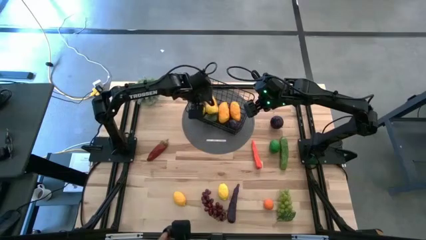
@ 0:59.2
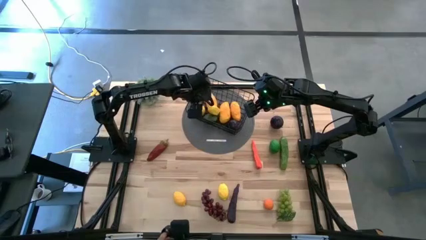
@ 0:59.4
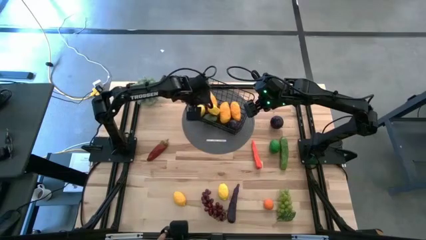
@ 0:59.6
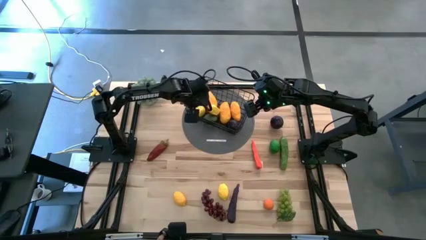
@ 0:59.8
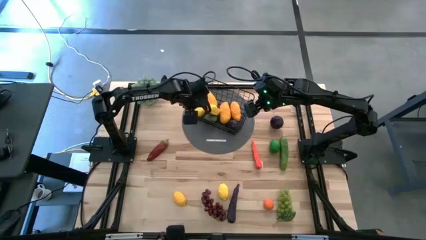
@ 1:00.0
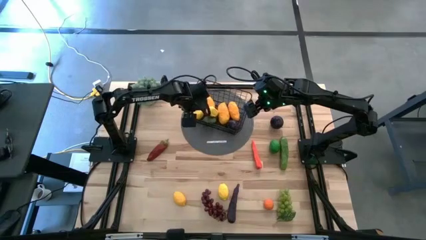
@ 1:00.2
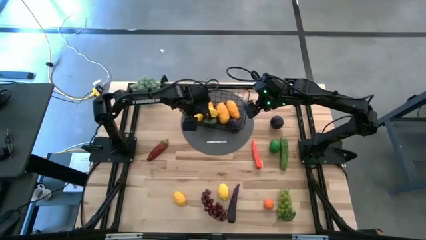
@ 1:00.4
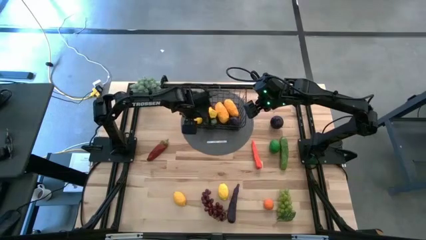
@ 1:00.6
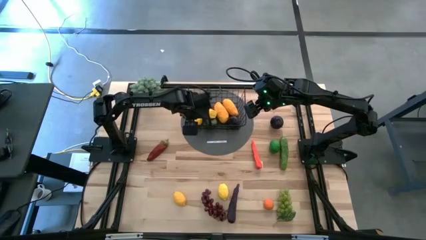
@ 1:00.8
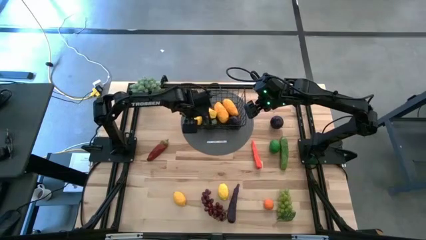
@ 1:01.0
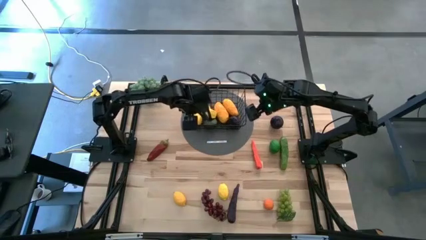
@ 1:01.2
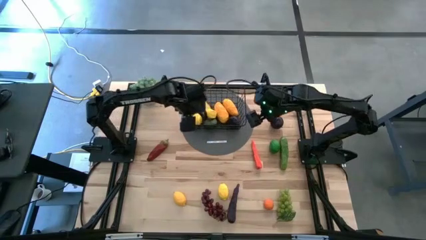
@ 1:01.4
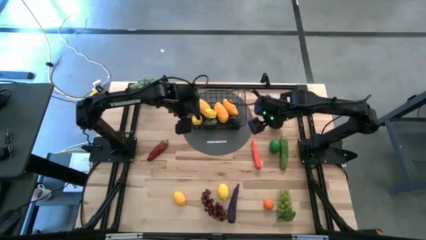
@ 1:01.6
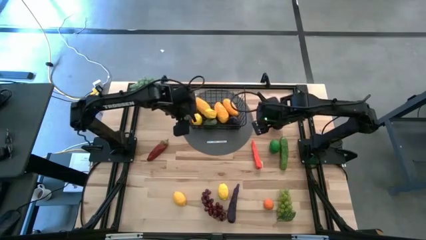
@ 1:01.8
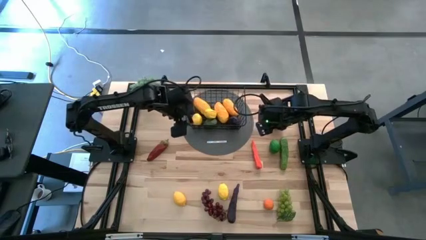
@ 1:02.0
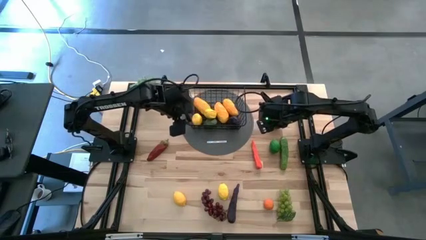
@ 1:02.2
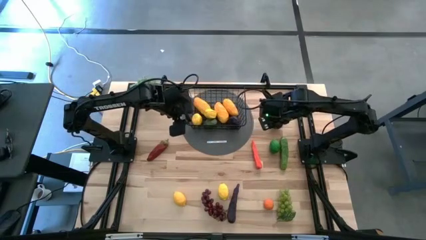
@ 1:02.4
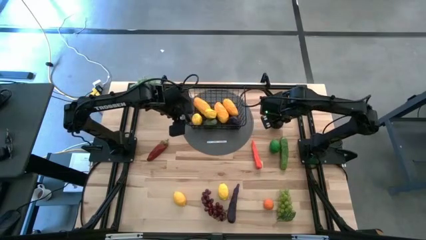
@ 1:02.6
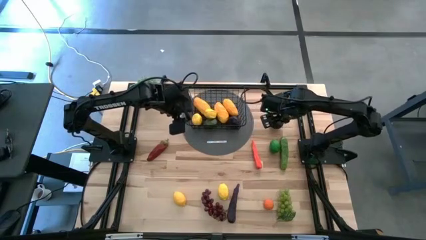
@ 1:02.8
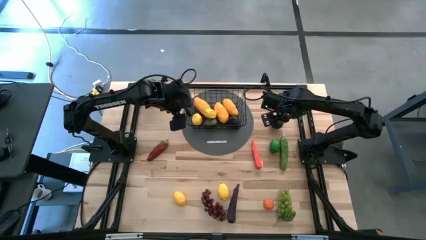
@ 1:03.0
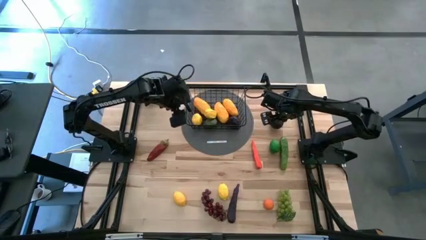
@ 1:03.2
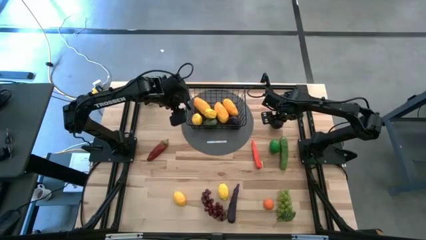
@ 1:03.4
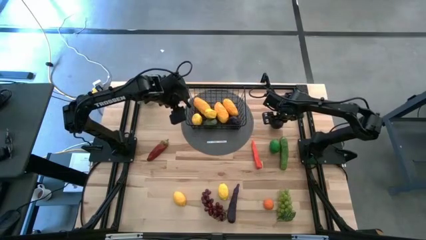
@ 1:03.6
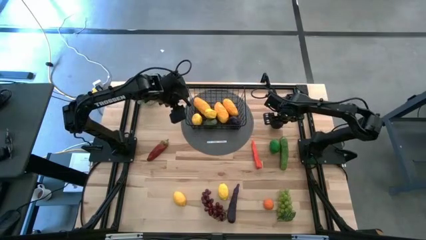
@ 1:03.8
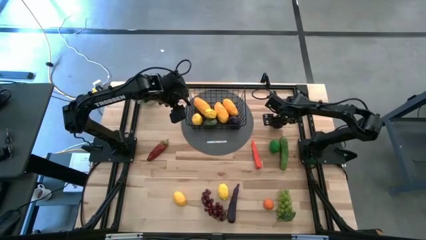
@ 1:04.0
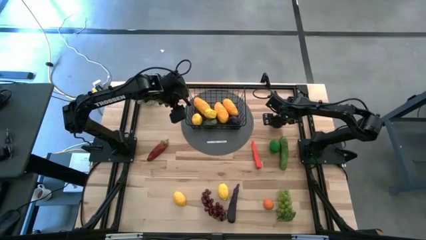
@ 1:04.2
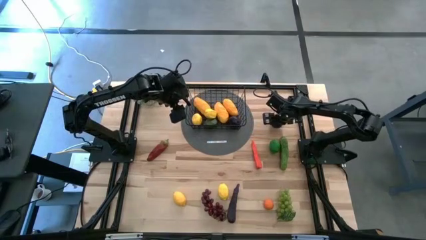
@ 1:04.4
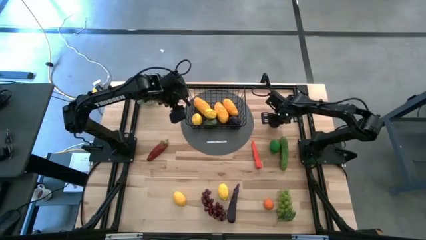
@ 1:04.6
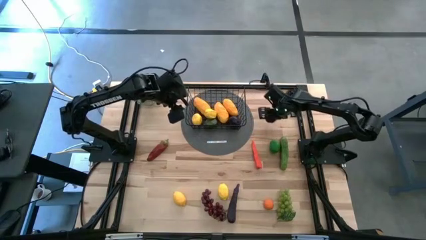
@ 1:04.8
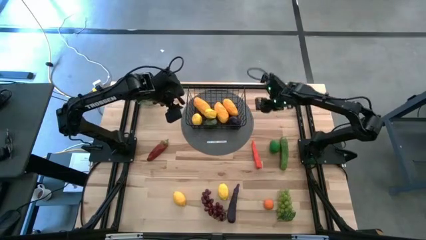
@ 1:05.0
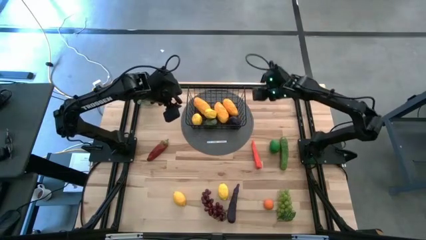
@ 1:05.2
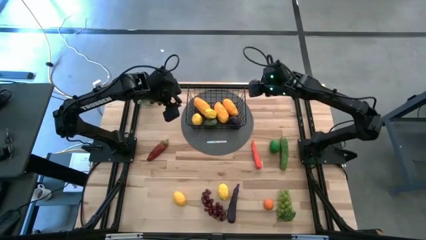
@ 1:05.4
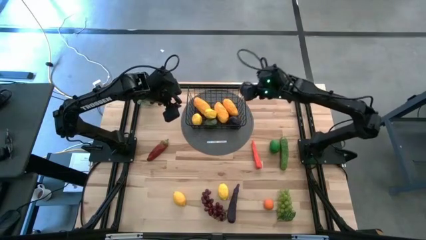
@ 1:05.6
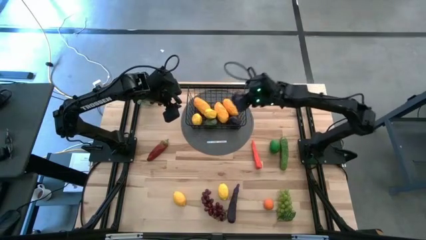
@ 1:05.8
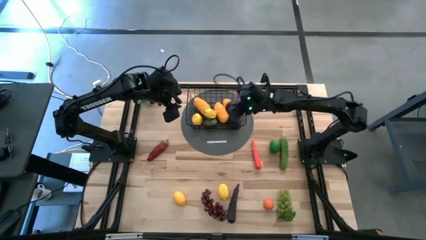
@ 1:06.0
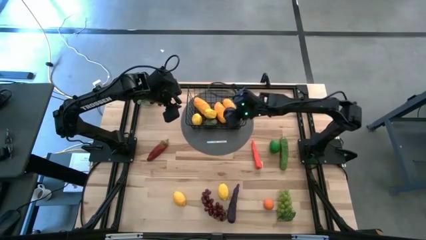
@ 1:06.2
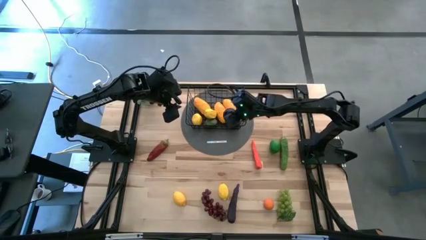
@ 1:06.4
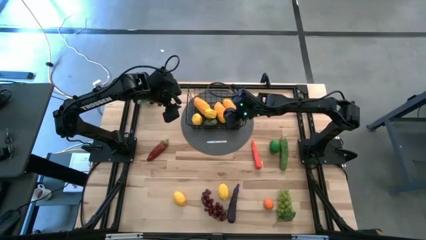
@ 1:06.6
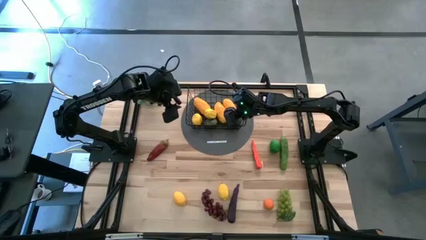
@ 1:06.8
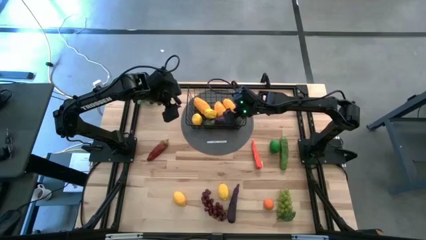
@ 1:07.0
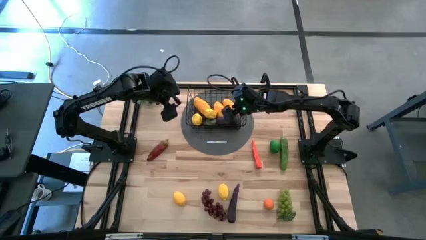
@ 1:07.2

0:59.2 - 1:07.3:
Task: Build produce basket
Put the right purple beetroot into the black wire basket

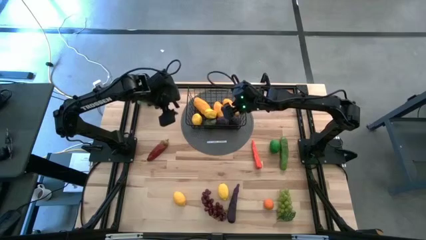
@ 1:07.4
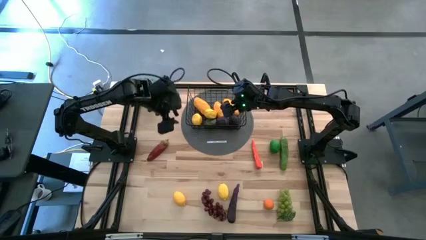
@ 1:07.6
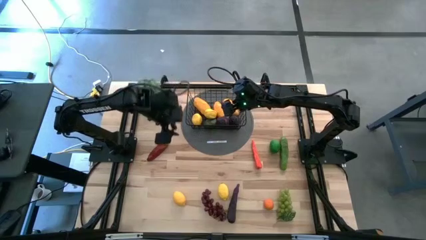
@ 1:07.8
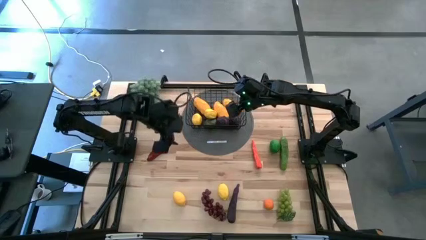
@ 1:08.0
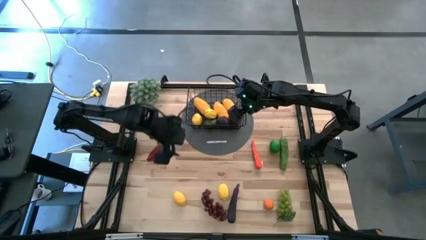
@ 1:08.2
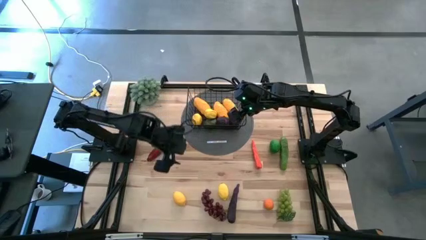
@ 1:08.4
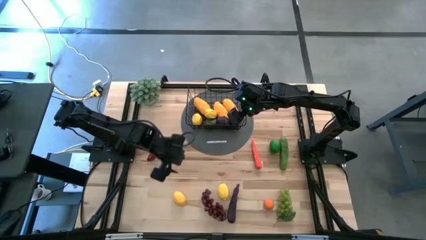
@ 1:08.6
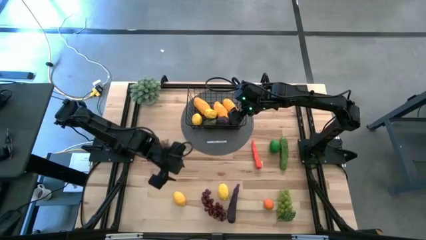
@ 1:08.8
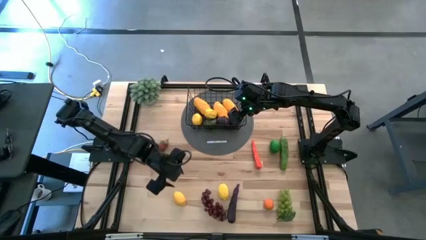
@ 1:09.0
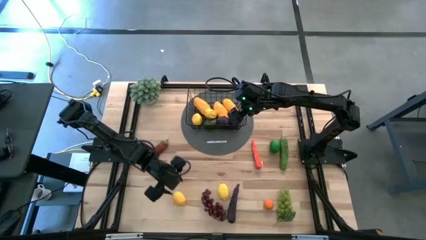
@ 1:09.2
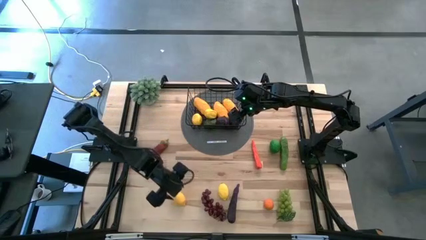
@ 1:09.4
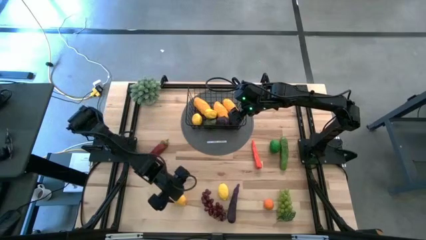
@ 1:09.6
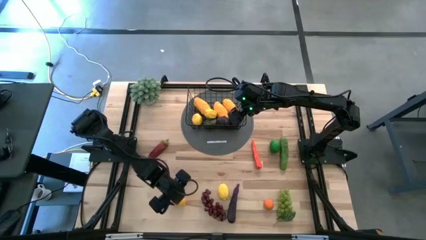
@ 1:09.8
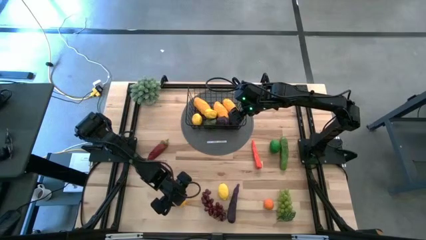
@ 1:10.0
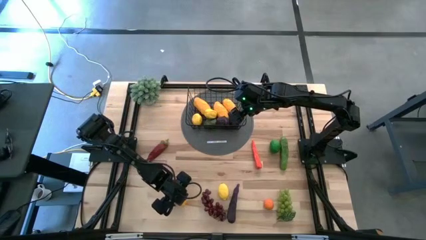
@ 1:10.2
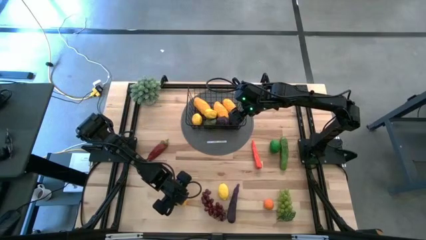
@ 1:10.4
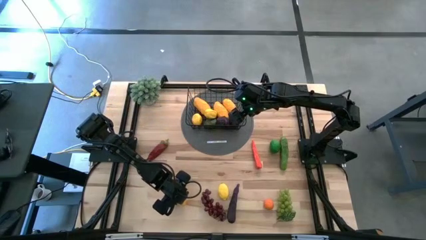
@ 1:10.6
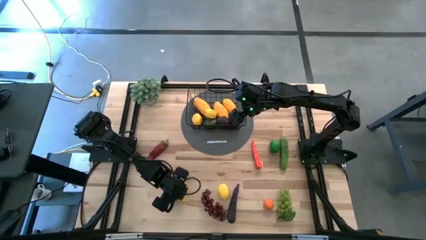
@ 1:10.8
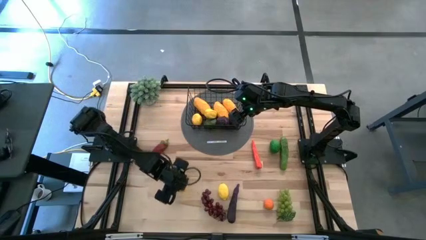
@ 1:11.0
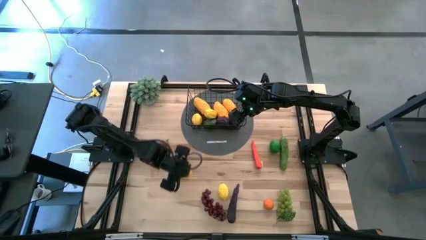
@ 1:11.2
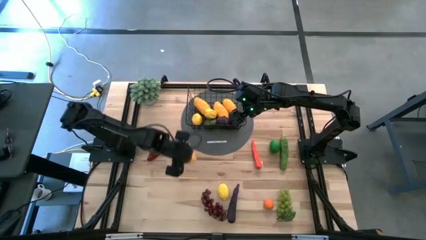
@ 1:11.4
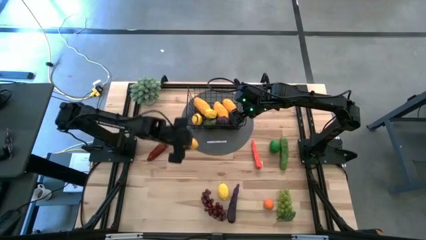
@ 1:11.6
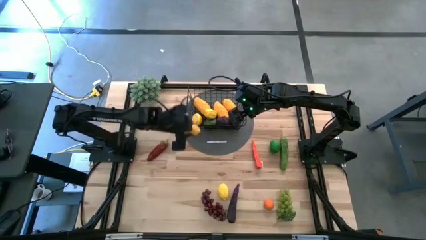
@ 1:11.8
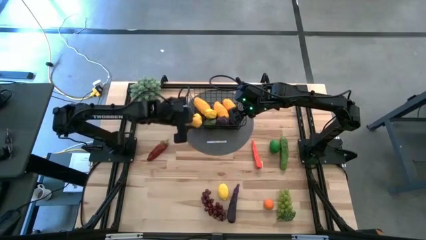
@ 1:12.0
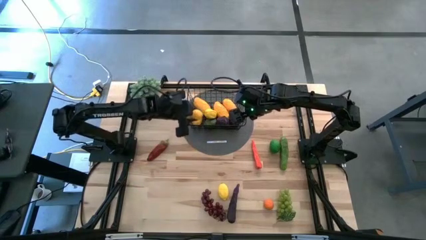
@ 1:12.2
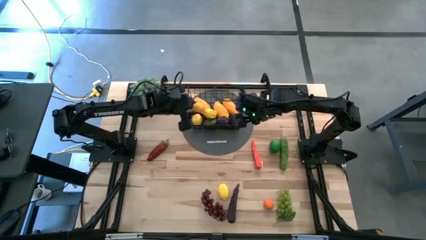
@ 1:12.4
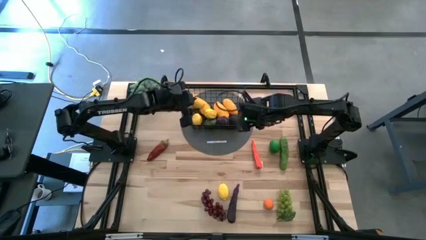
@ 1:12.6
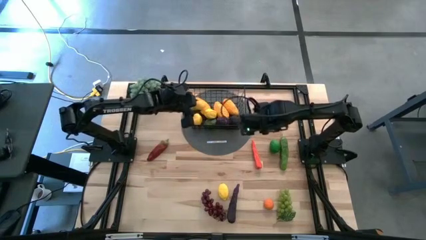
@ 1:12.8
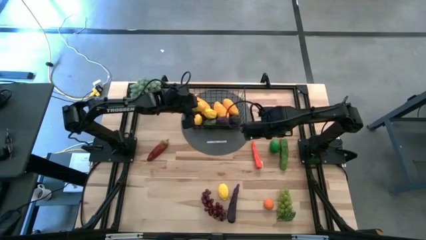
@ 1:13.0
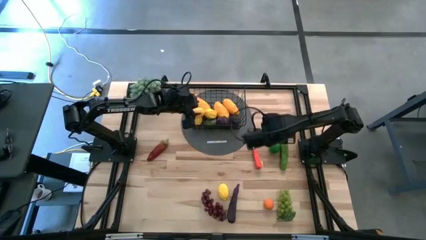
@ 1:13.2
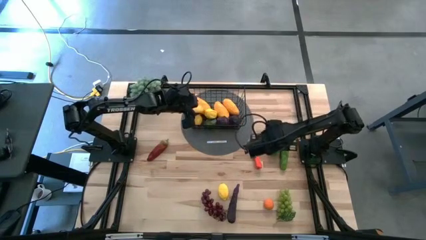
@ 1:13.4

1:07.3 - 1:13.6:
Put the left yellow lemon into the black wire basket

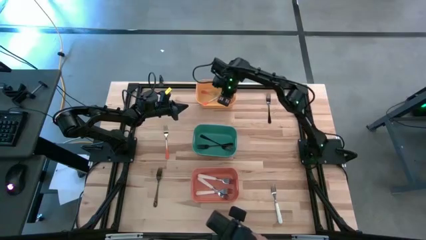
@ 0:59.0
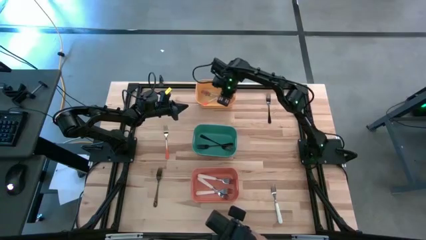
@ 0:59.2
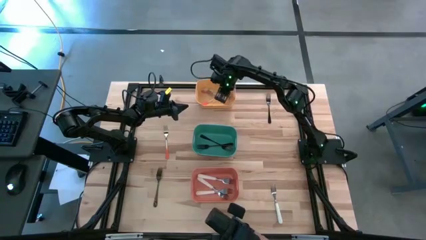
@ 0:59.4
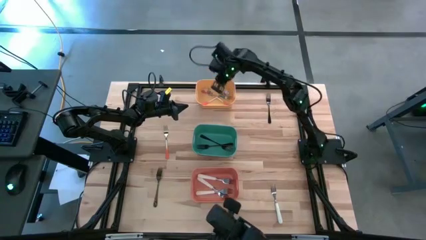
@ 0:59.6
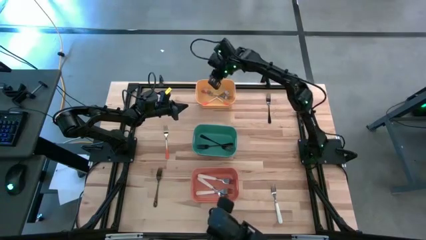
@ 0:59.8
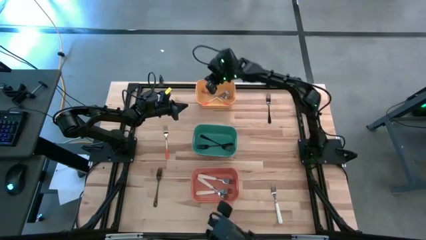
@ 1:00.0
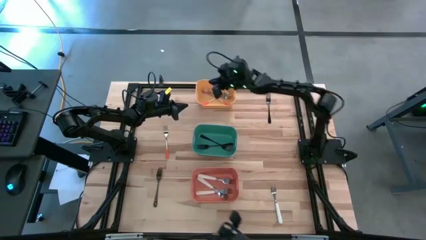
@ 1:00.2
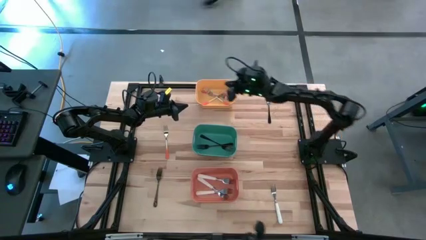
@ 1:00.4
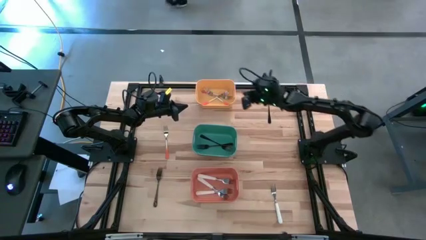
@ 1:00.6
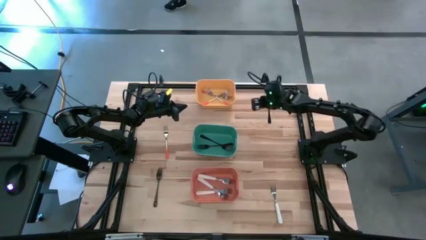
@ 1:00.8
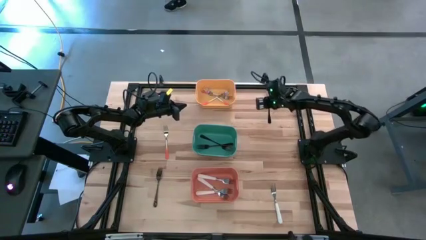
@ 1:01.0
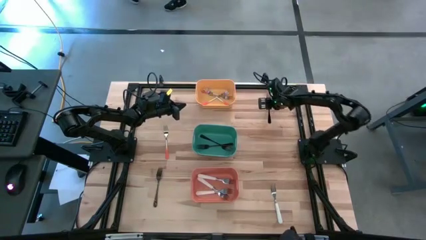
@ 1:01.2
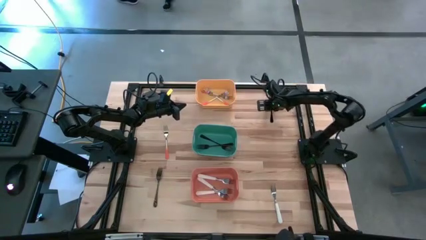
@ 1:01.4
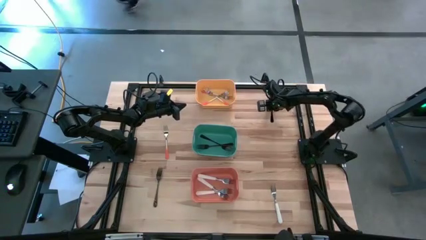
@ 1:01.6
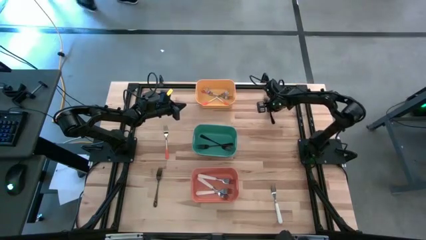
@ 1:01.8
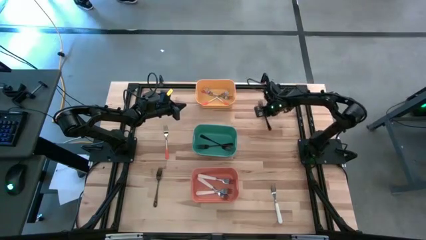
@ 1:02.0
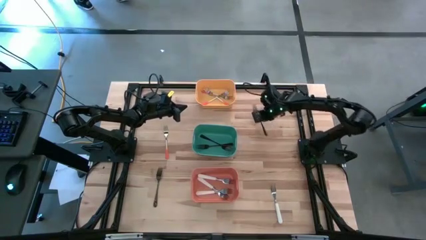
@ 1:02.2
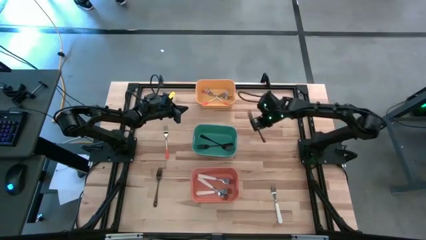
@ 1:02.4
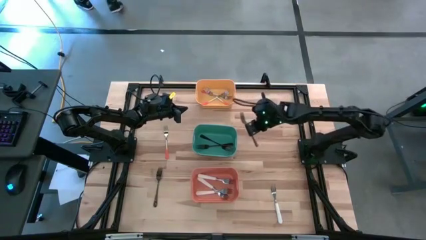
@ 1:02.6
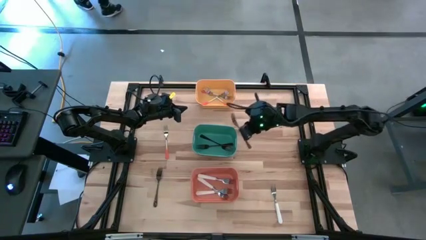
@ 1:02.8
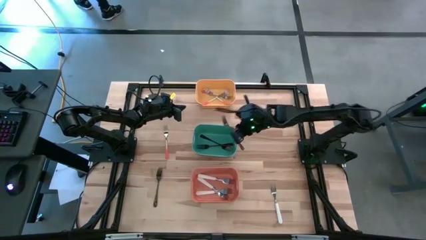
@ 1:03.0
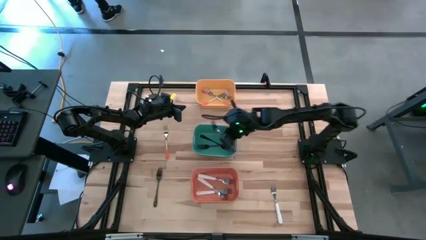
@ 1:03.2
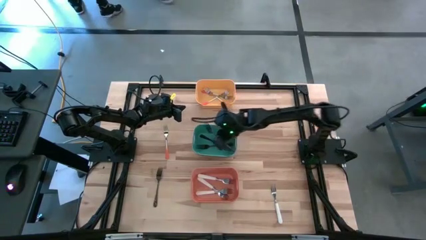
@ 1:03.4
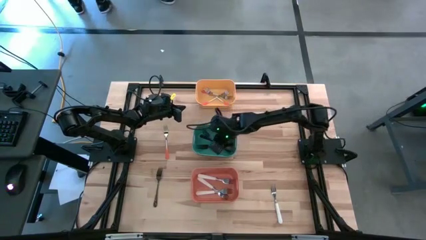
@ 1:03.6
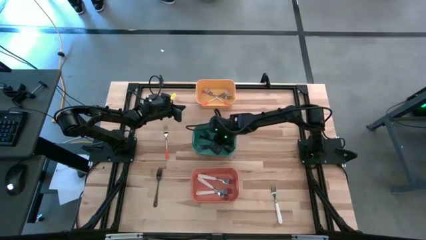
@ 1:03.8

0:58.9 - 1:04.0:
Task: Sort silverware by color (type)
Put the black fork into the green bin
